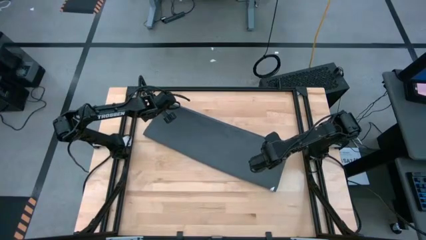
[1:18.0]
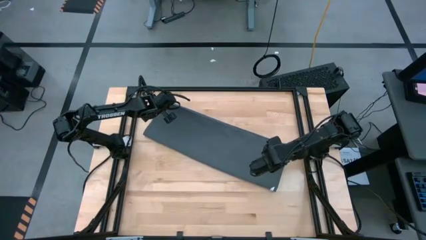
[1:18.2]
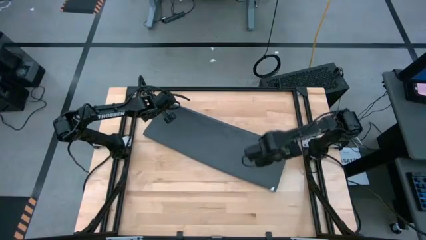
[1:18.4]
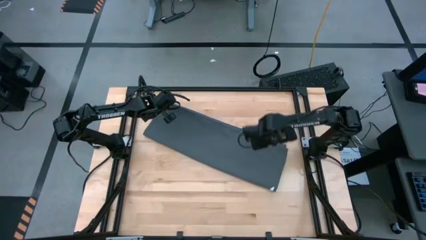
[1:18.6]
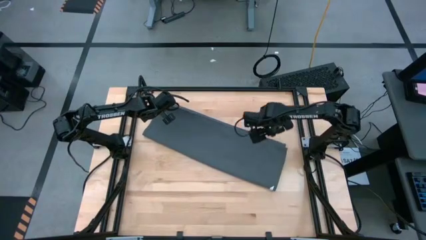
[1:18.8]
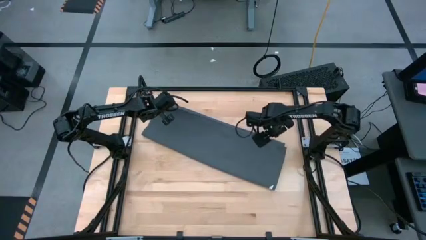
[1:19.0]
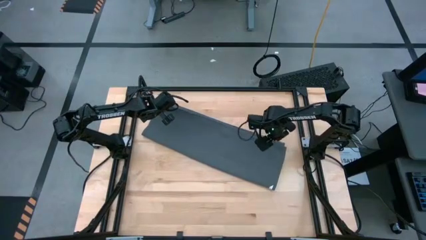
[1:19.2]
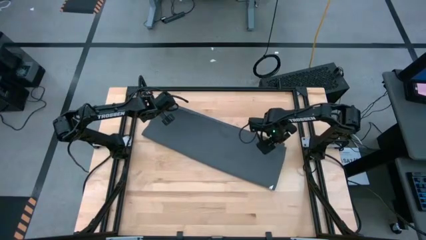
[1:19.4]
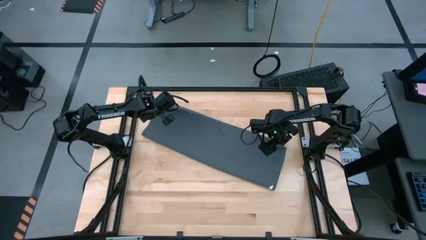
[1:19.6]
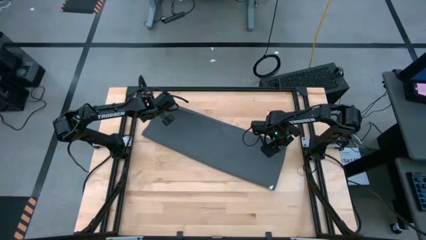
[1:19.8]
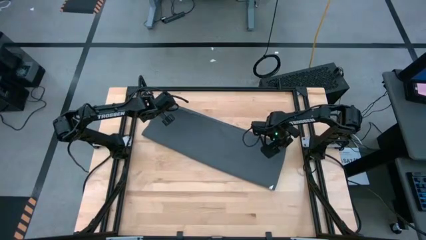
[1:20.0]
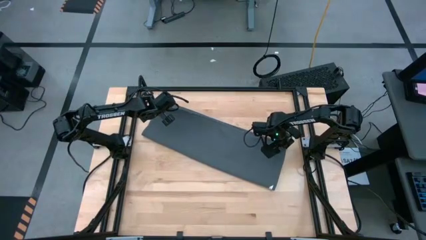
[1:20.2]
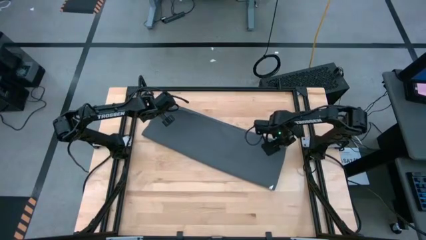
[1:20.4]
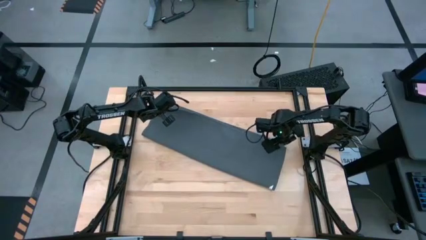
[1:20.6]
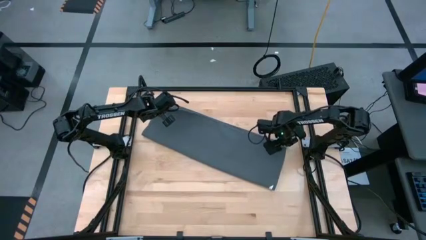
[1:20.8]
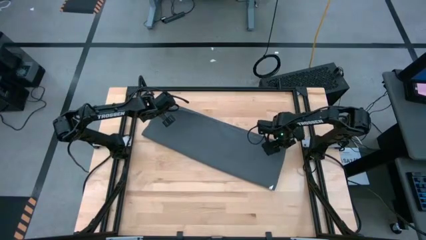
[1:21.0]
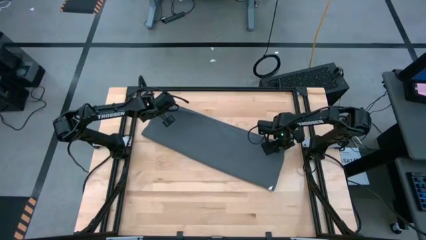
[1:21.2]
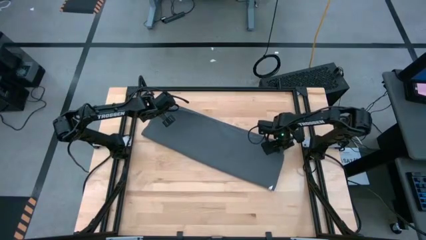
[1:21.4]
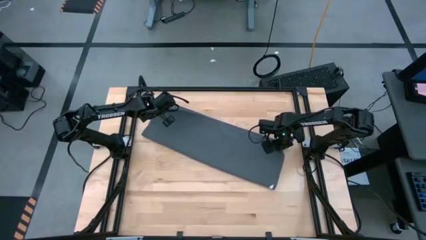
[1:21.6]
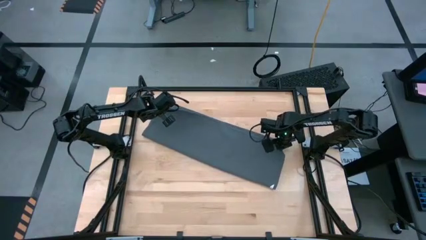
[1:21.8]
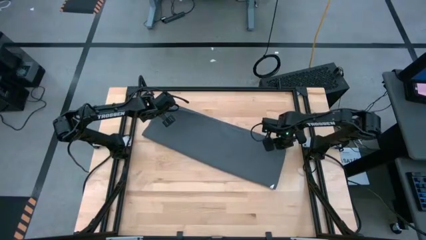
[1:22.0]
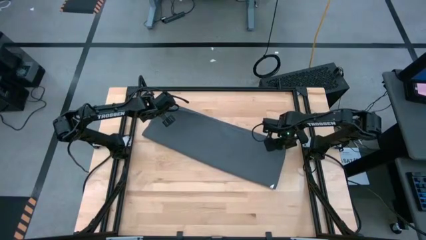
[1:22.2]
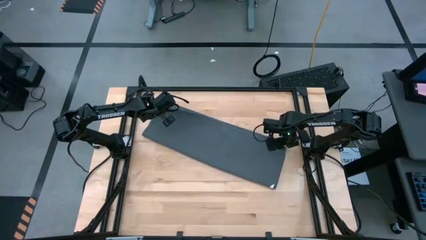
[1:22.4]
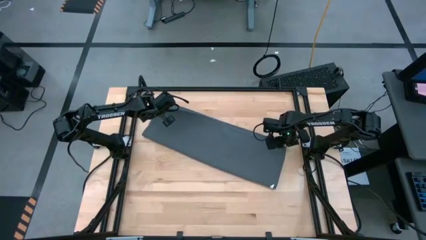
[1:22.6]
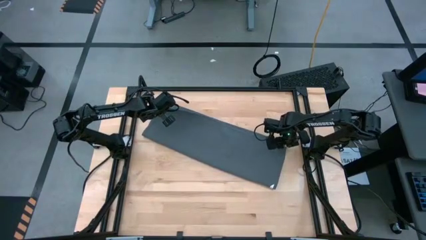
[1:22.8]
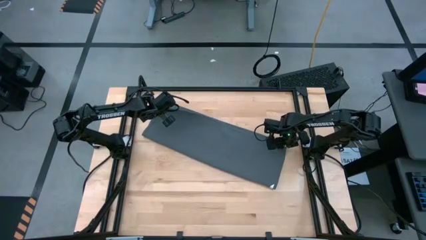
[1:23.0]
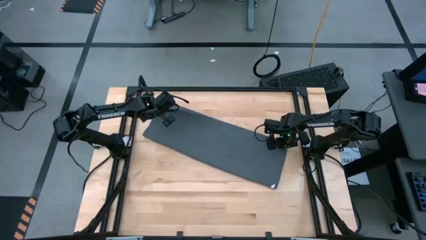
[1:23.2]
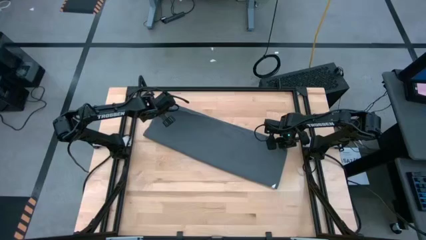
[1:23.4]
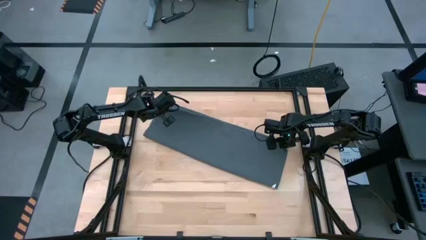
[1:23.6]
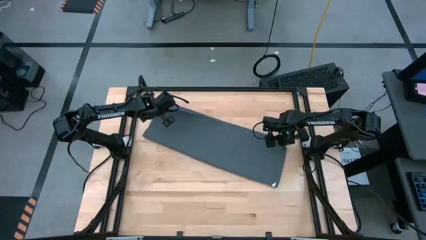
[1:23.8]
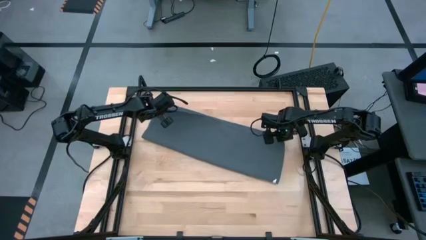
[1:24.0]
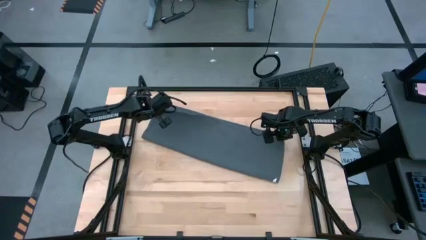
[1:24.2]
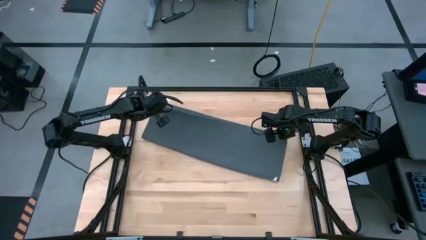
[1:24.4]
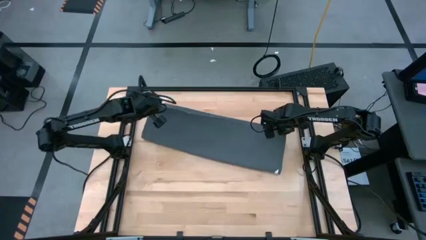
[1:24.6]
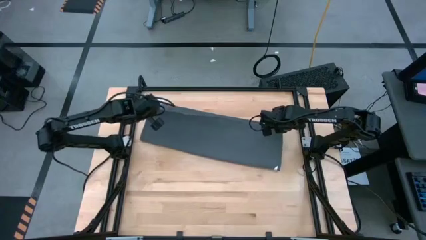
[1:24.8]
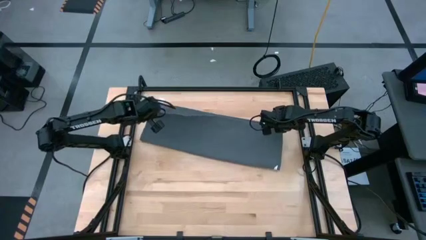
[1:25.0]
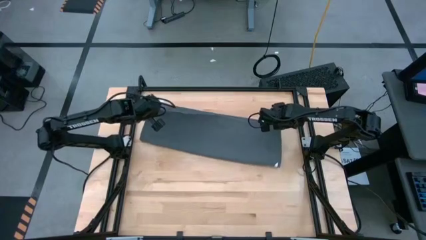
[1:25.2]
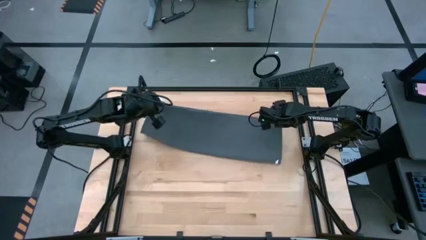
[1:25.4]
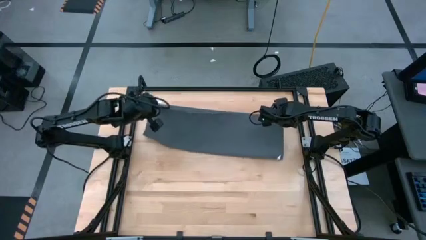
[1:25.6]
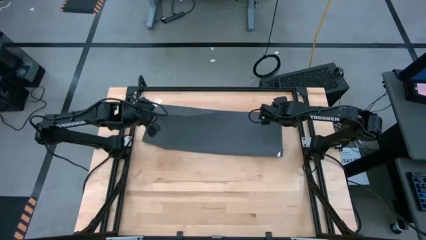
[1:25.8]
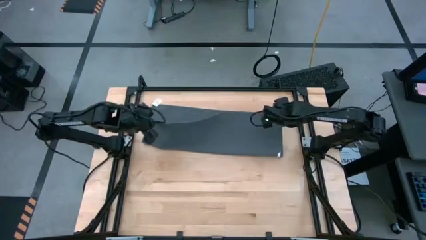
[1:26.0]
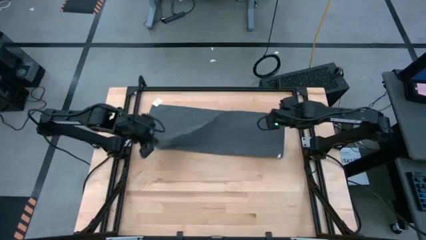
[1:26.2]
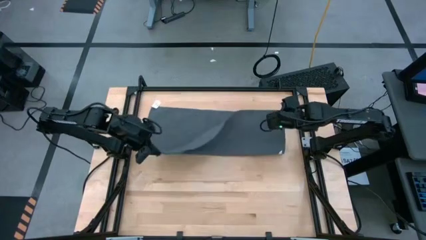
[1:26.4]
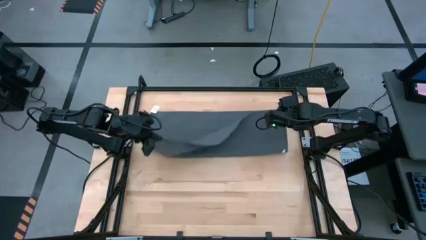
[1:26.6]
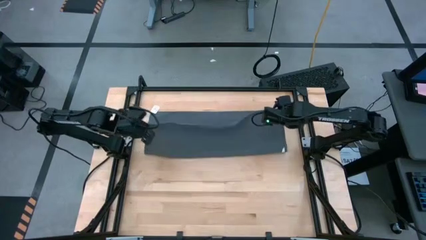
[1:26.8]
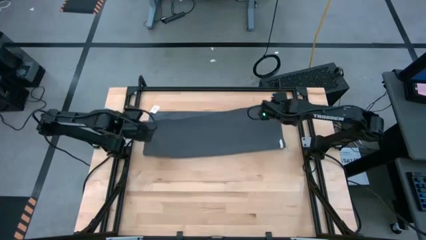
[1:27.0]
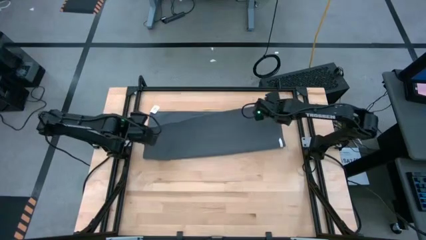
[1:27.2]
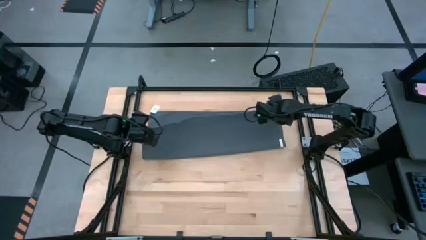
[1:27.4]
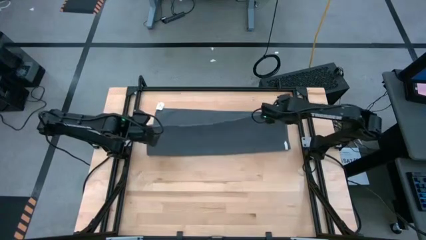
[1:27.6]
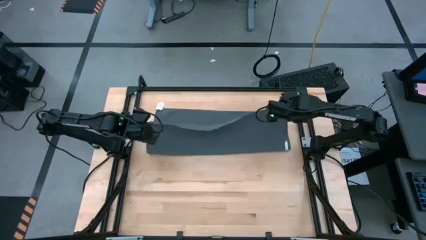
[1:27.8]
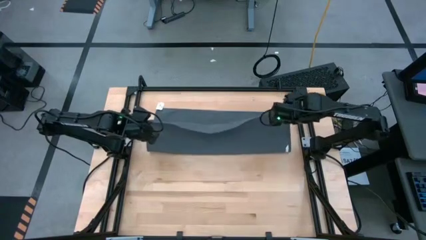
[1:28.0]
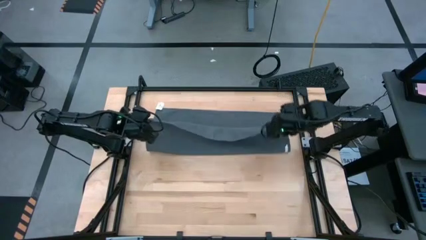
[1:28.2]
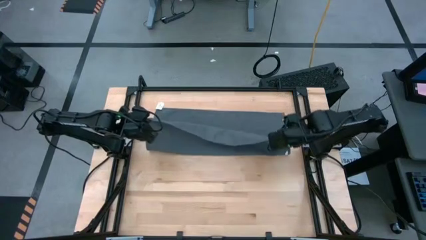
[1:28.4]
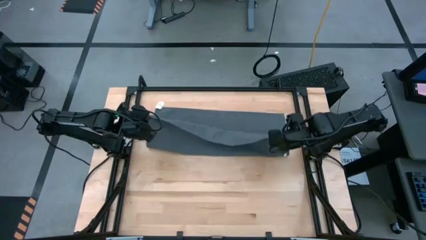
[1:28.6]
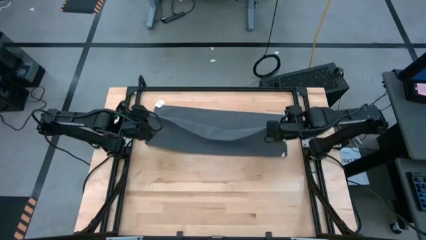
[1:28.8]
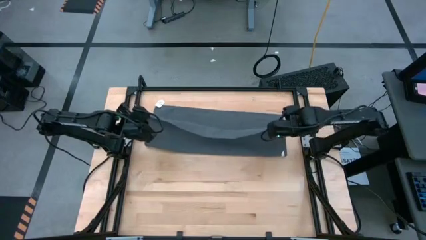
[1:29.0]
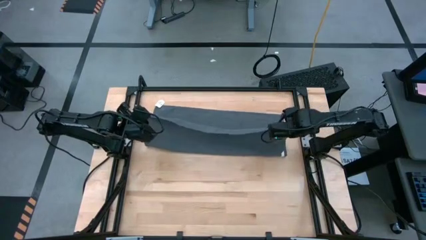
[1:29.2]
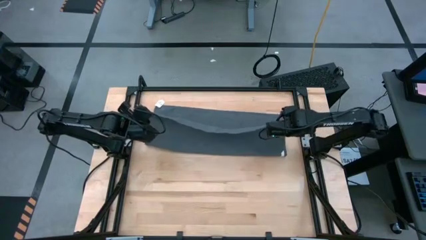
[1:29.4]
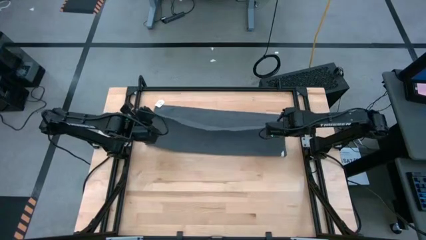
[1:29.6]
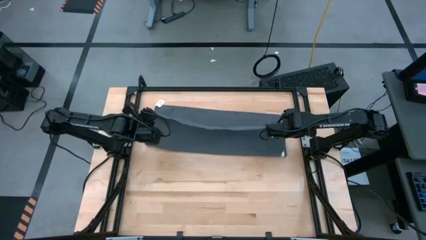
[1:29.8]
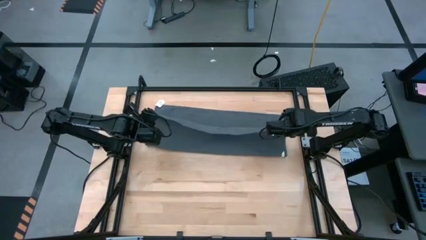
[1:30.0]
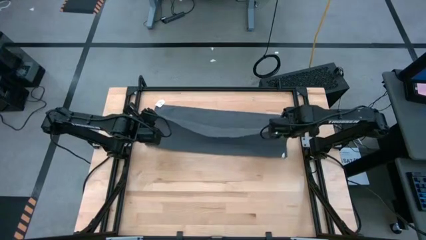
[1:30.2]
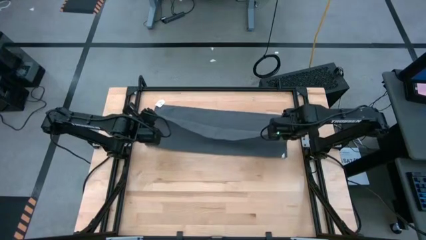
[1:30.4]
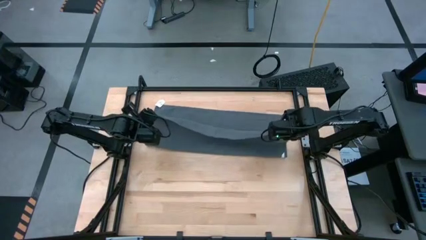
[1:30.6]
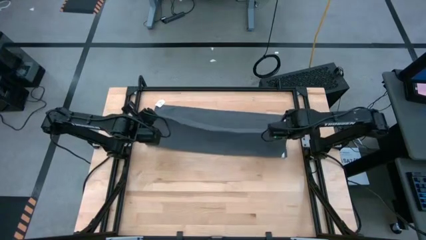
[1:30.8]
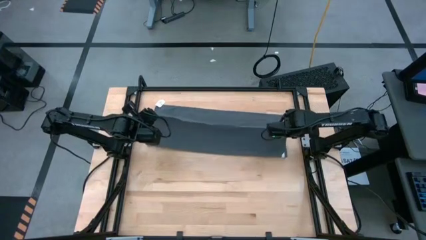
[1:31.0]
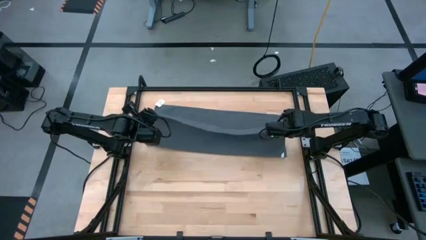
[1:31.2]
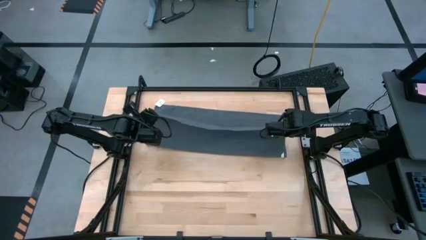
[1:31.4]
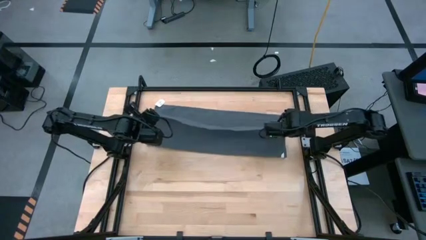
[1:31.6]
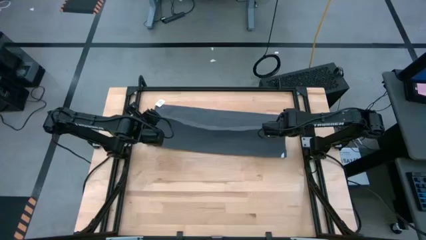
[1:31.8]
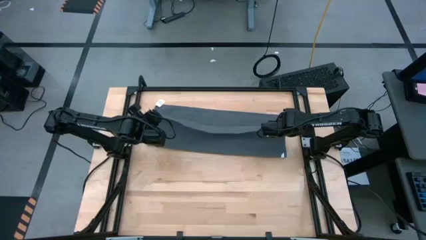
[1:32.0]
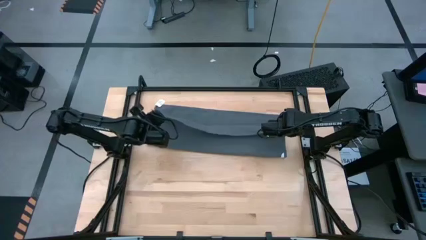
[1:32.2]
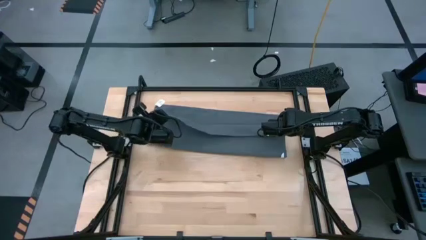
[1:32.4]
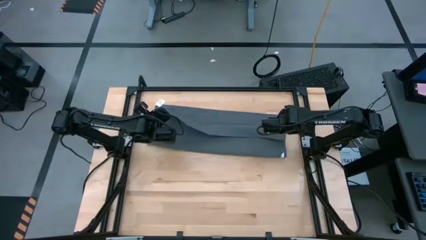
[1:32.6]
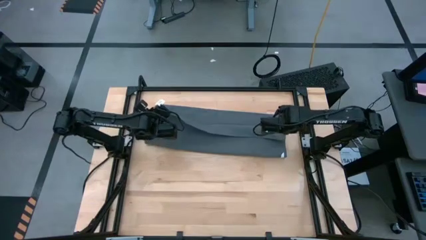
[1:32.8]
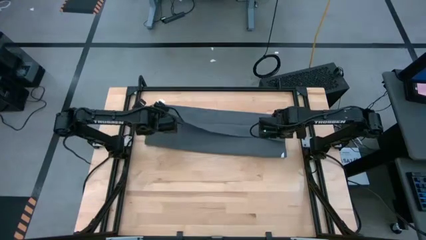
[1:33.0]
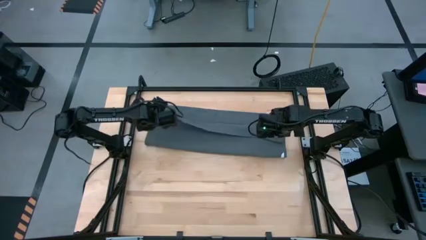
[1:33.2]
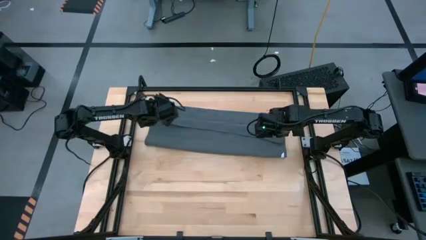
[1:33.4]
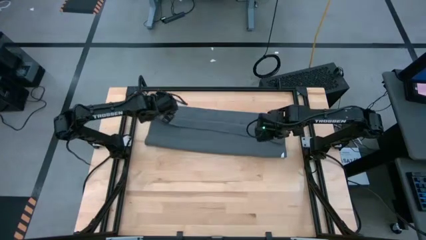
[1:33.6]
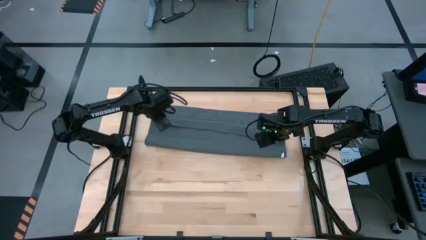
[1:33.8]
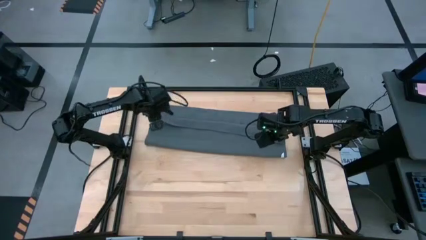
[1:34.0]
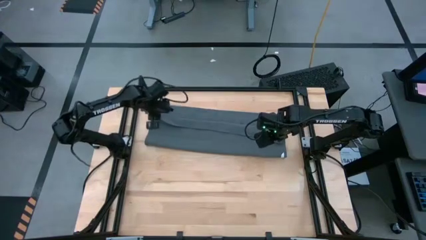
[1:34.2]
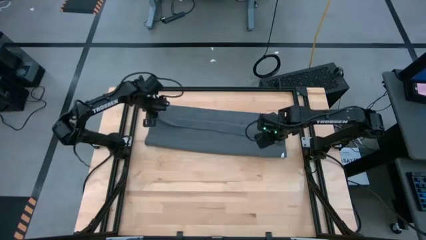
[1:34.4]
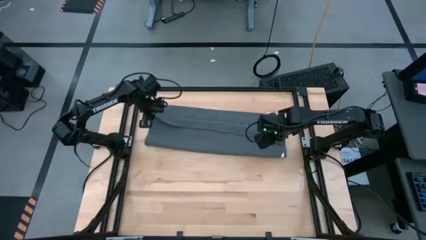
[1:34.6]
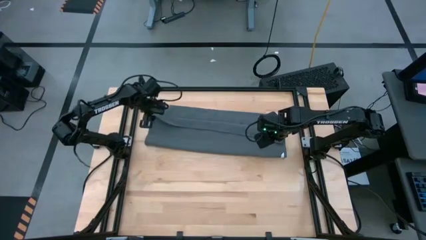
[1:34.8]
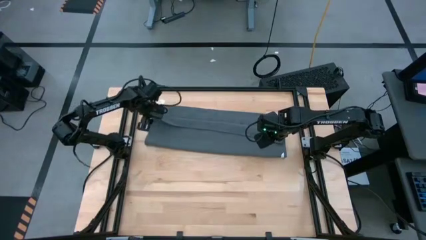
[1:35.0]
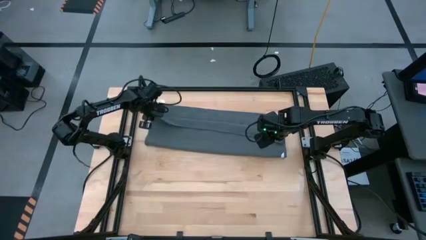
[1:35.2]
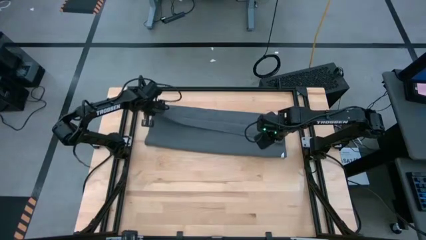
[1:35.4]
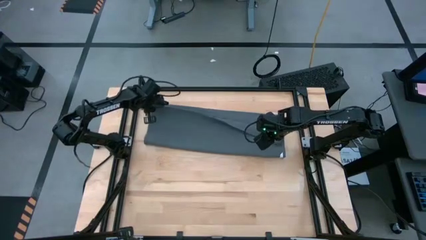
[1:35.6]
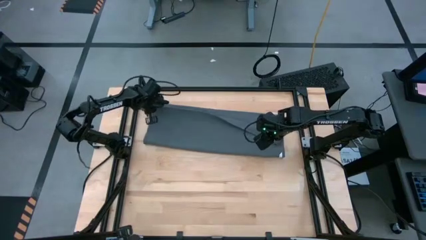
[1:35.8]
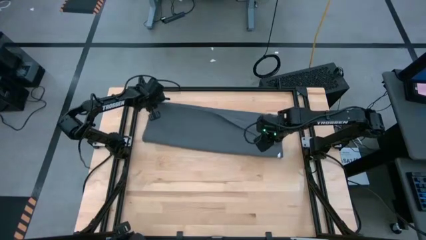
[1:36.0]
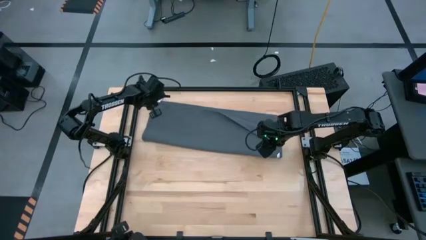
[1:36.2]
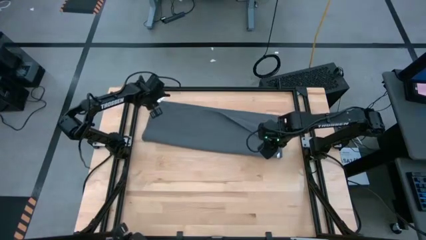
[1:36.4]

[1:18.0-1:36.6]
Task: Roll towel into tight, uniform cylinder
Roll the towel
